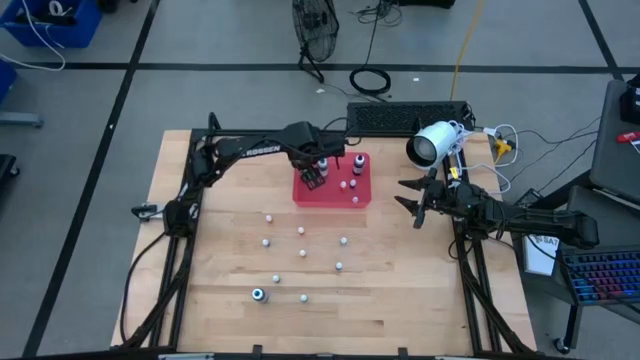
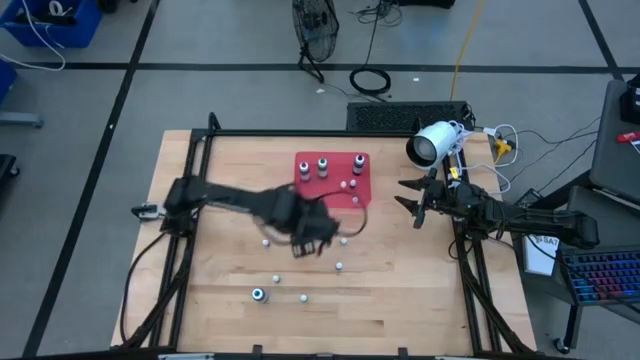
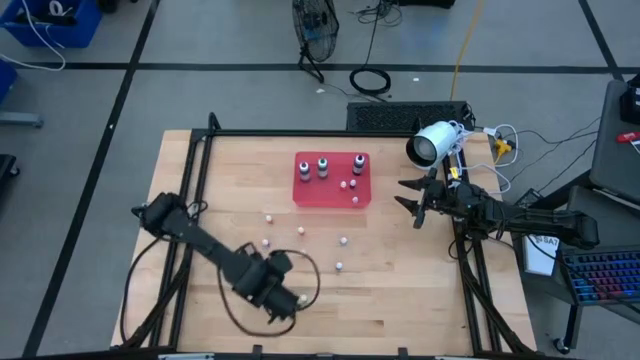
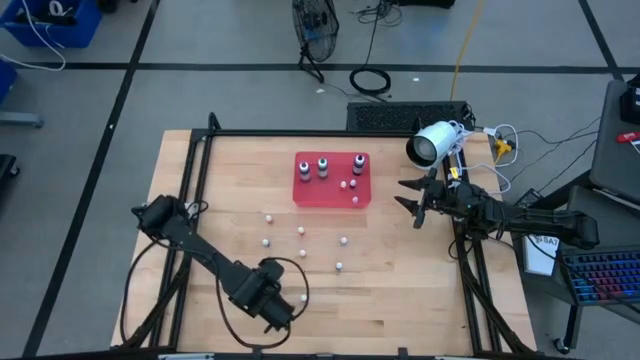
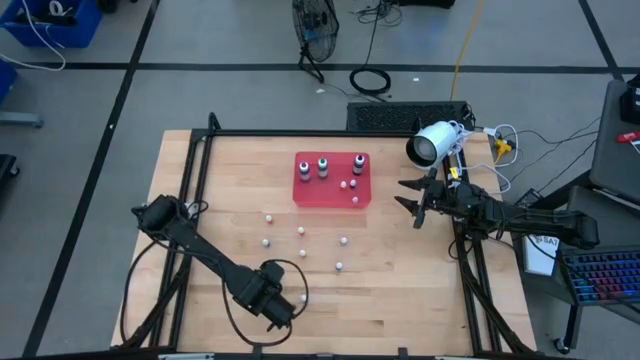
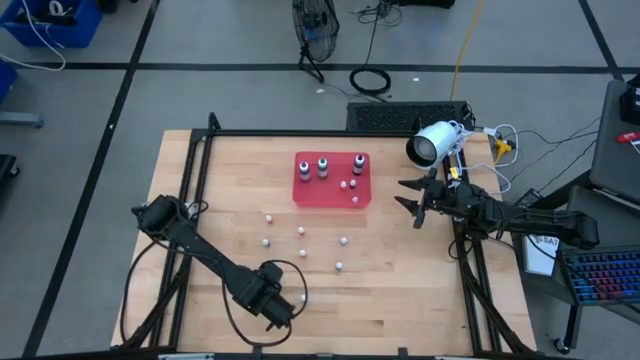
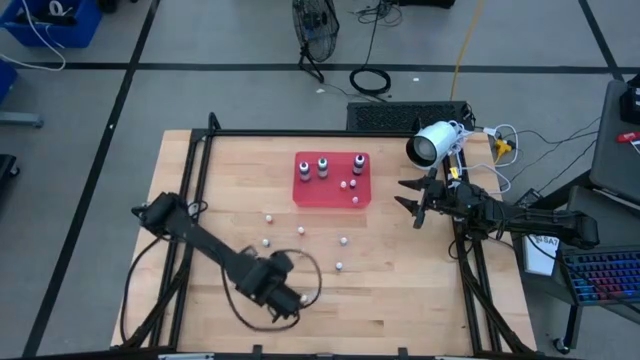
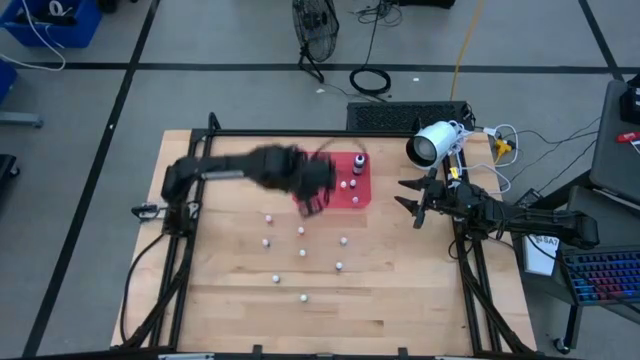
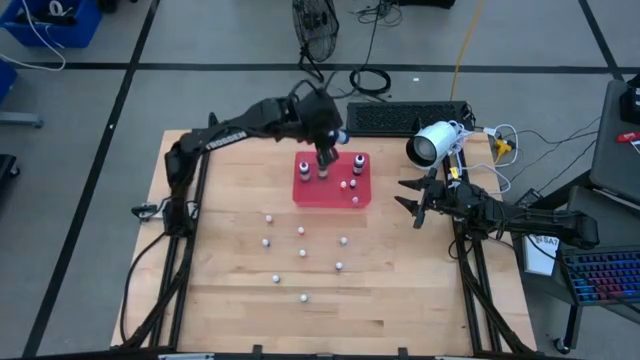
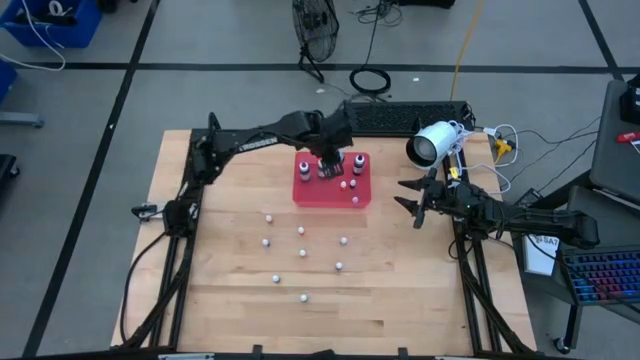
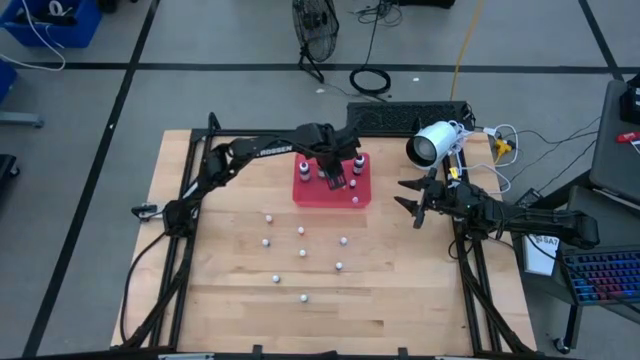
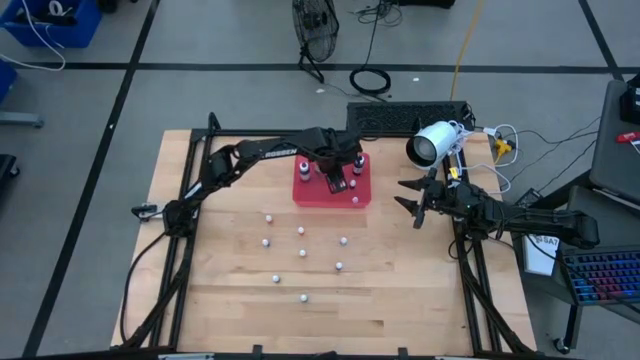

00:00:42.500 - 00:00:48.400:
Task: Pick & Place food coloring
Put the large blue food coloring bottle into the bin

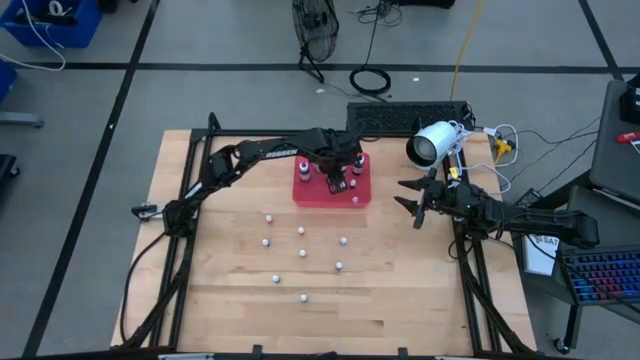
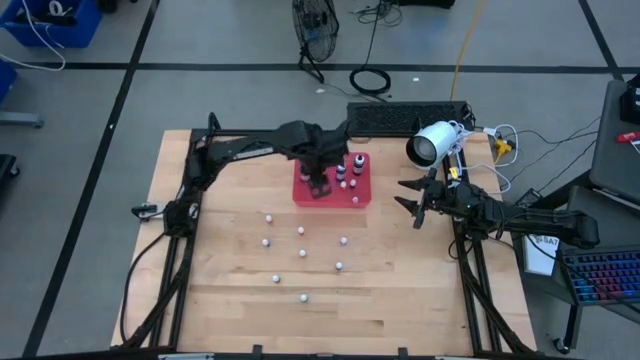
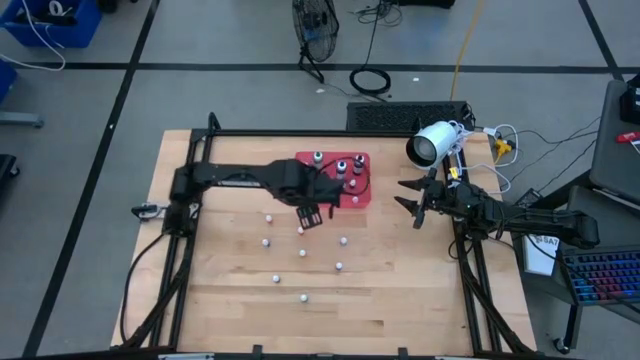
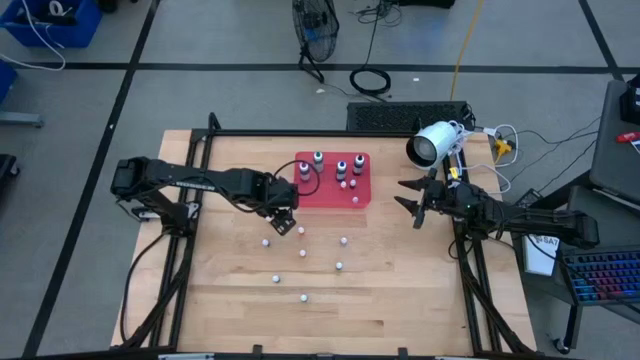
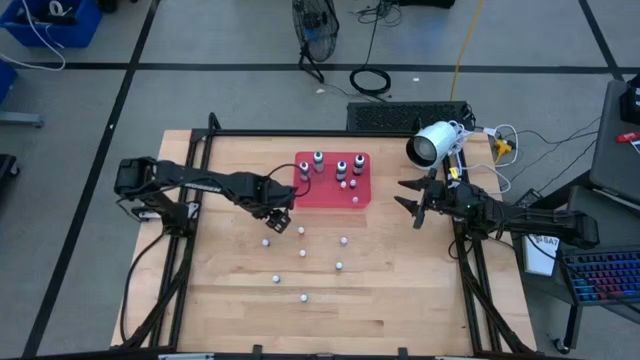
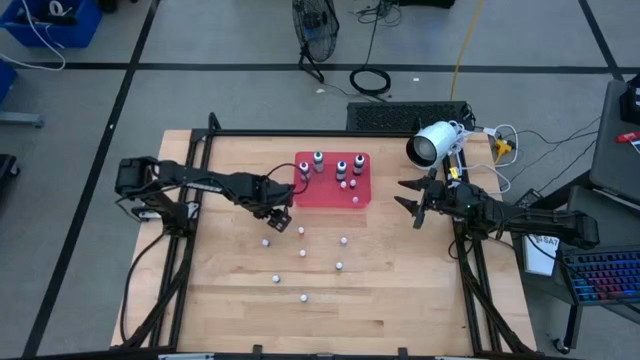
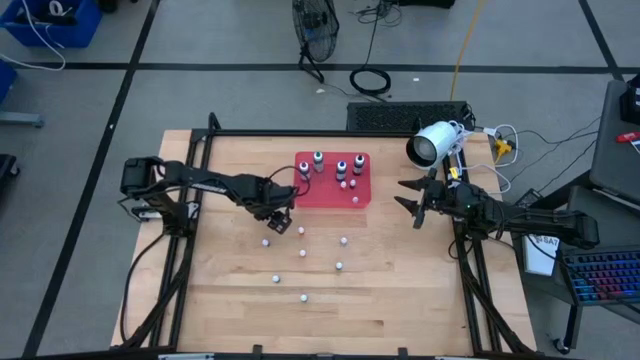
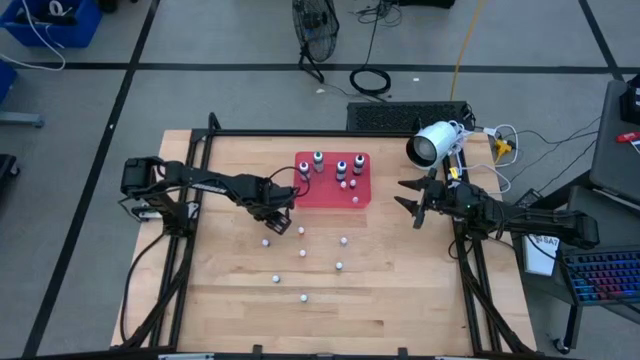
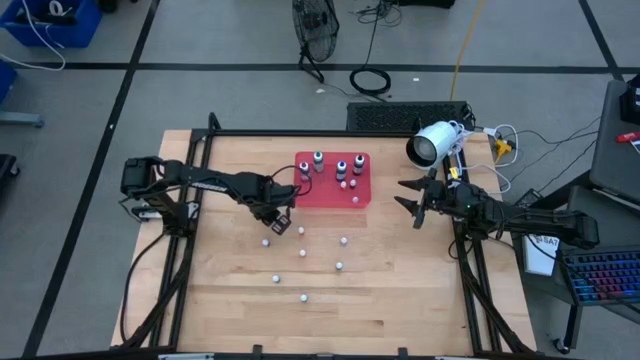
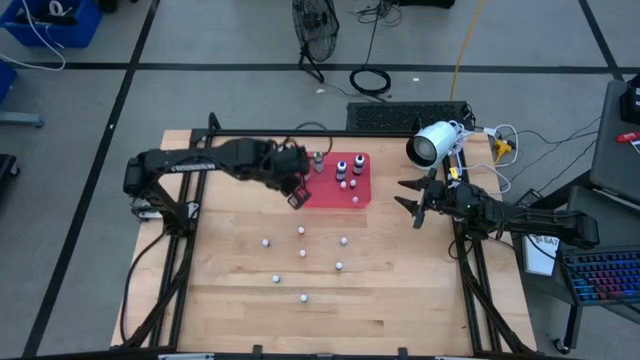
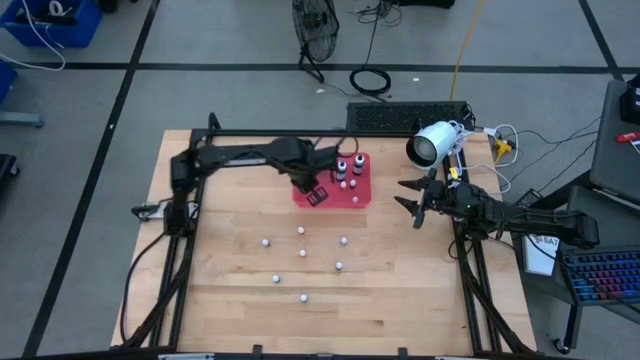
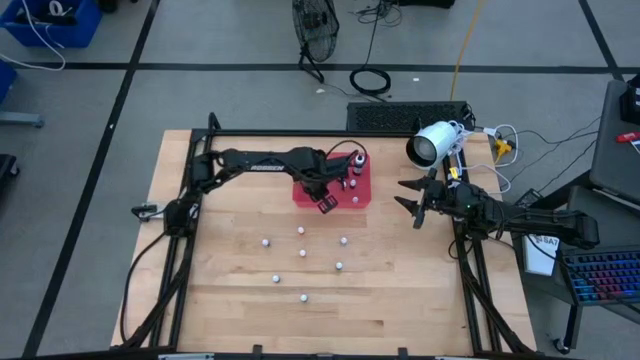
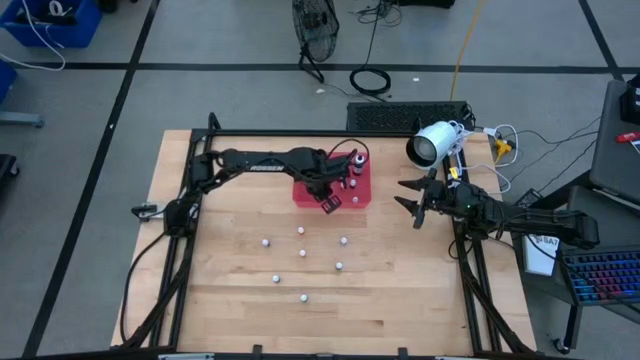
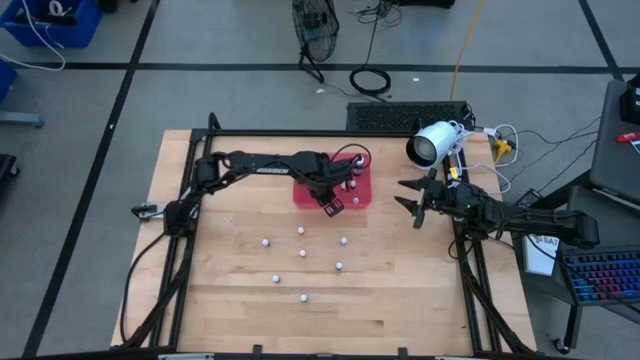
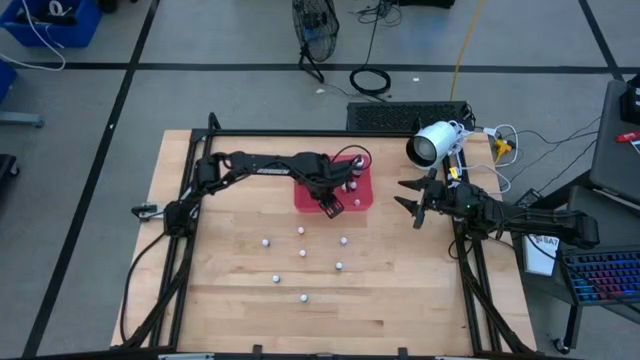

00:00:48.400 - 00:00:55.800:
Put the small orange food coloring bottle into the bin

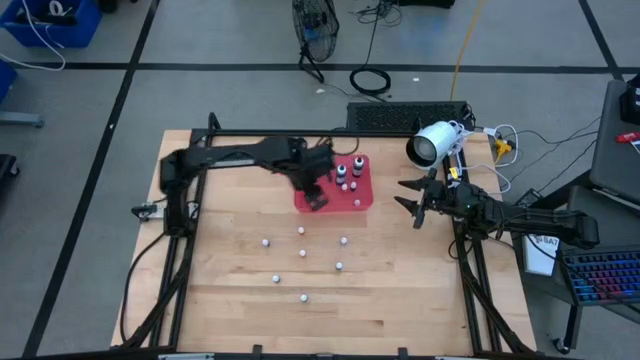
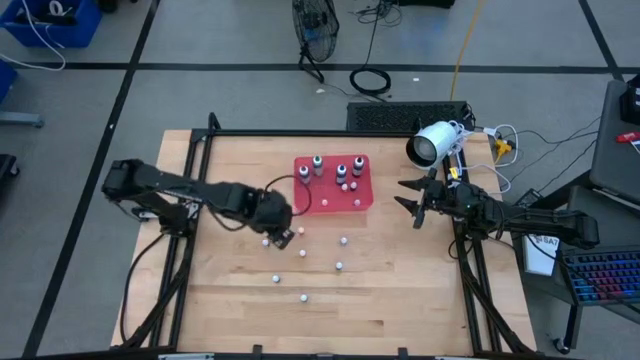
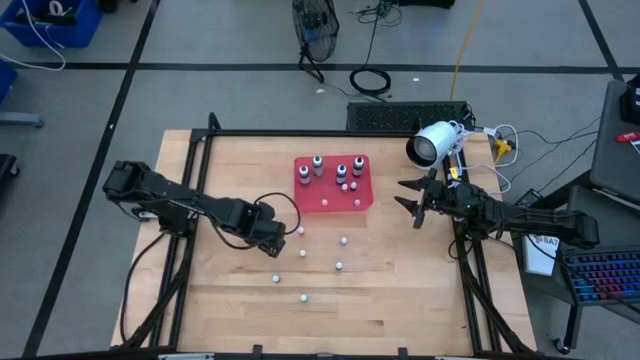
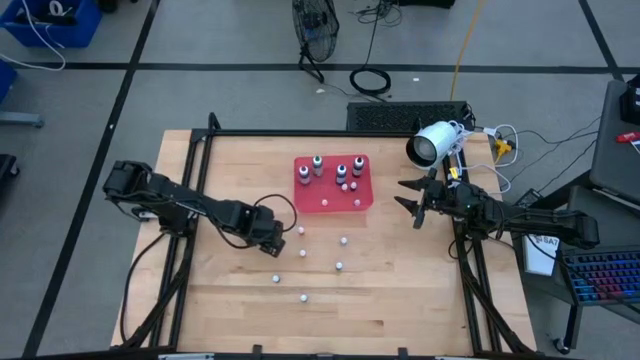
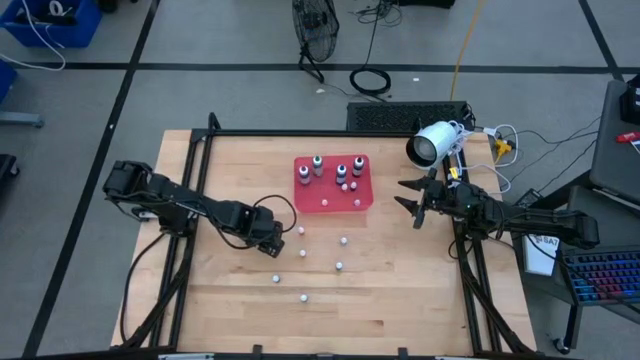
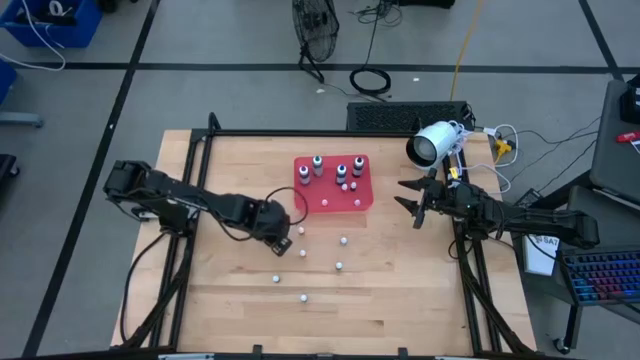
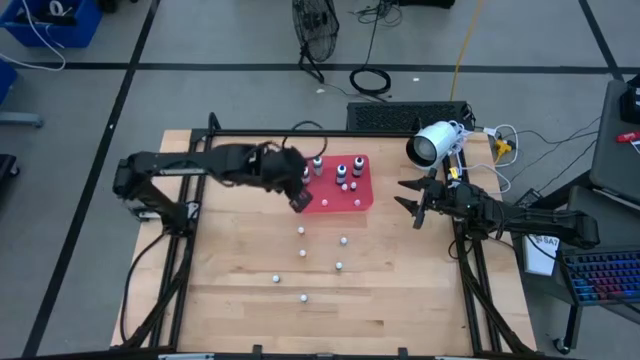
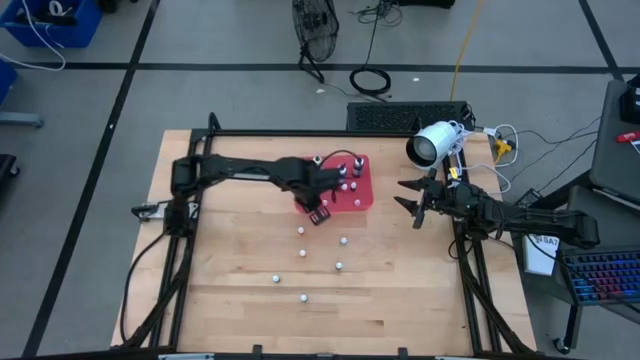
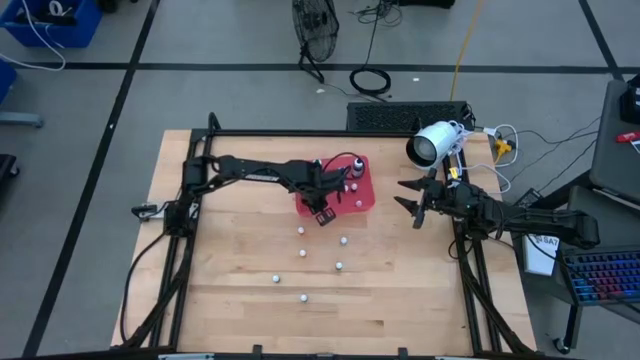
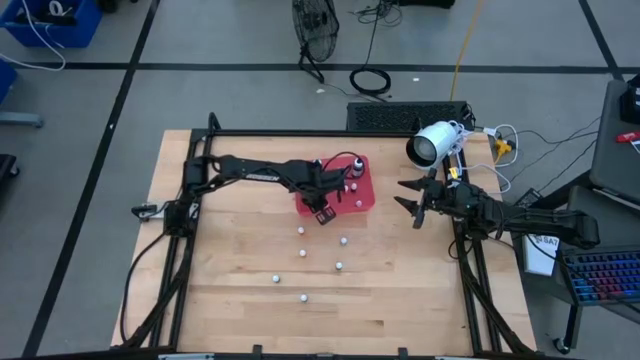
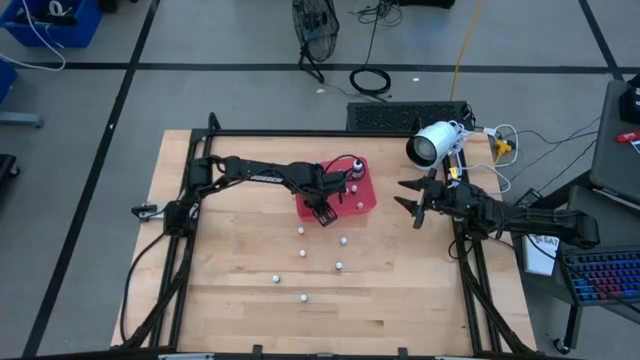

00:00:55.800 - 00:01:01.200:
Put the left small red food coloring bottle into the bin

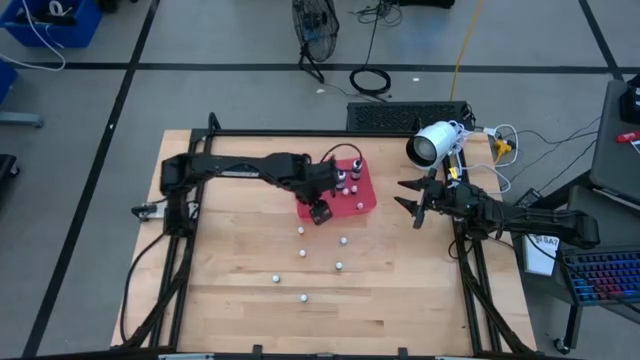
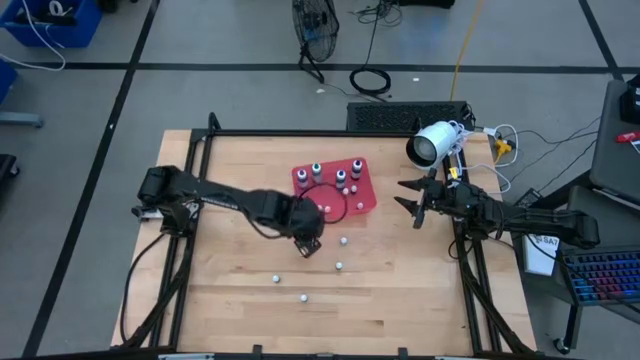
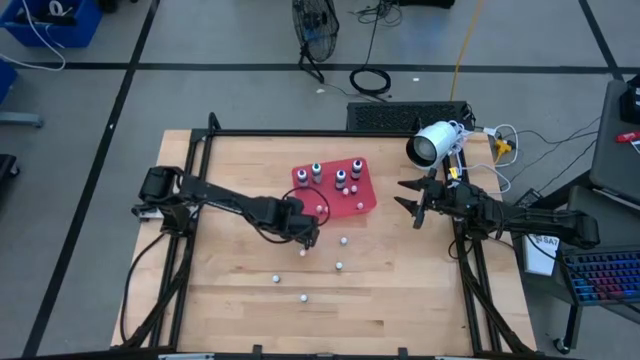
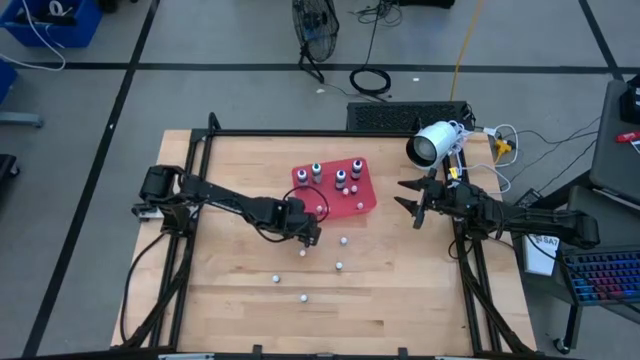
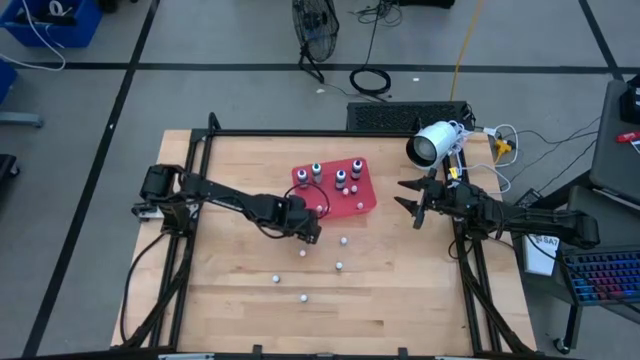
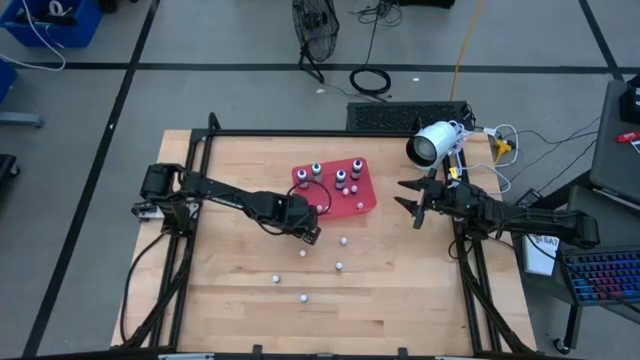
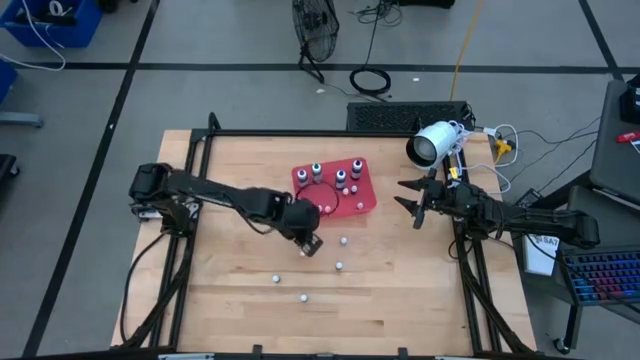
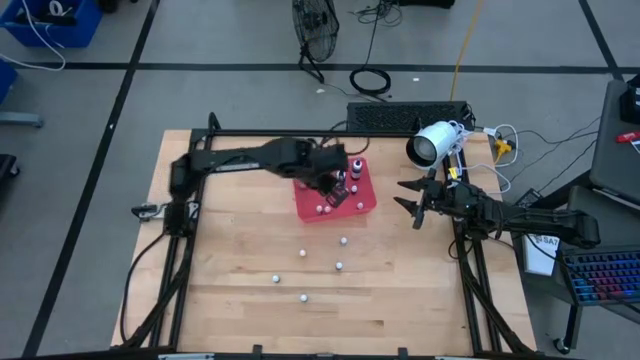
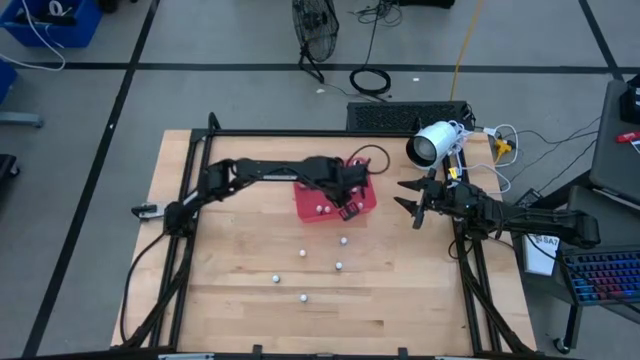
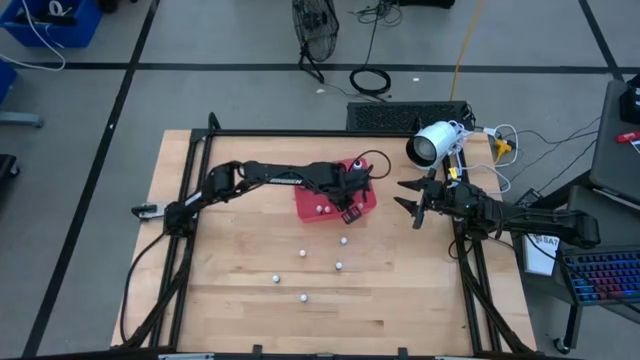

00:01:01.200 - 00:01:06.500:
Put the top small orange food coloring bottle into the bin
